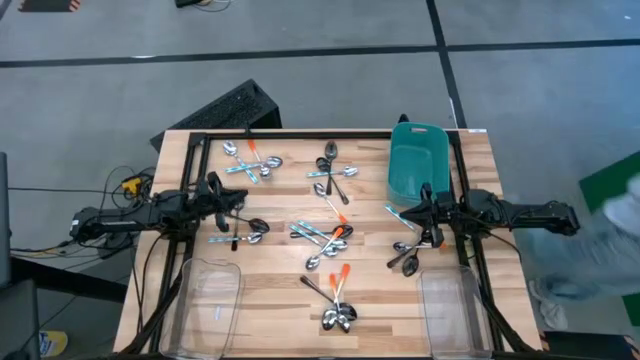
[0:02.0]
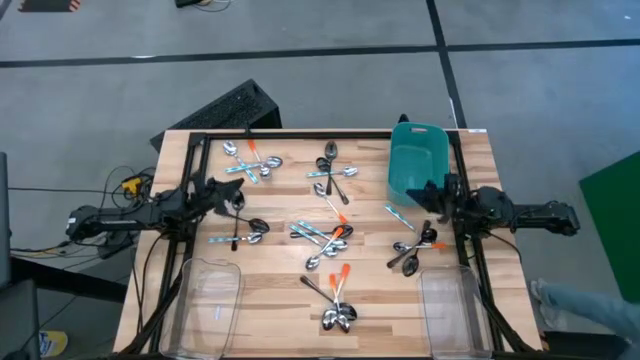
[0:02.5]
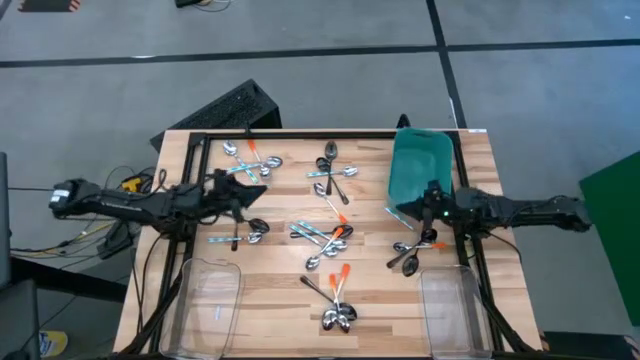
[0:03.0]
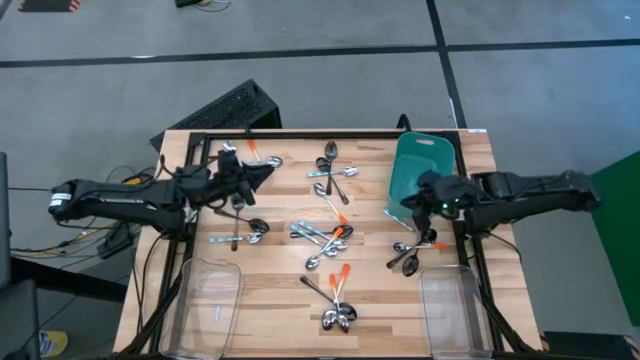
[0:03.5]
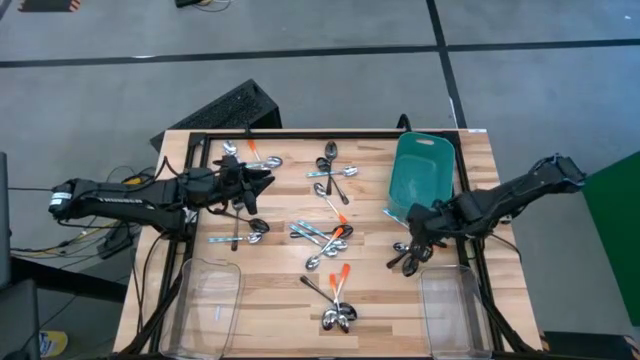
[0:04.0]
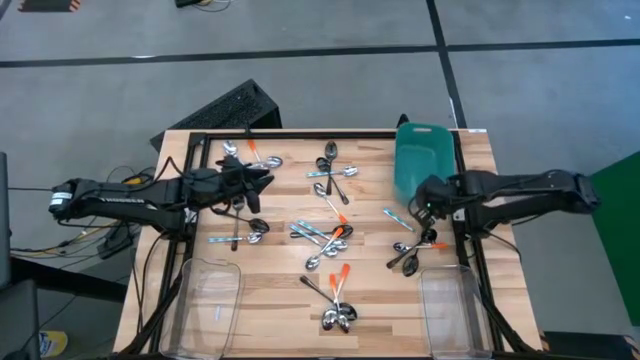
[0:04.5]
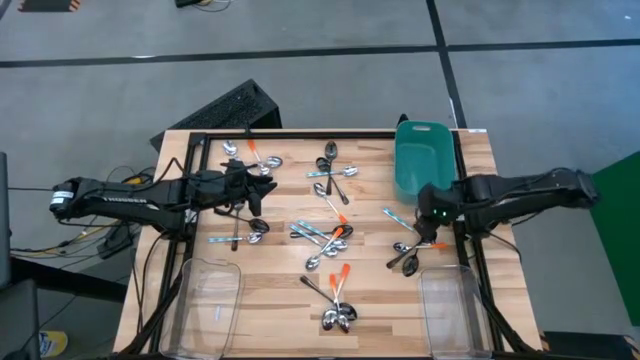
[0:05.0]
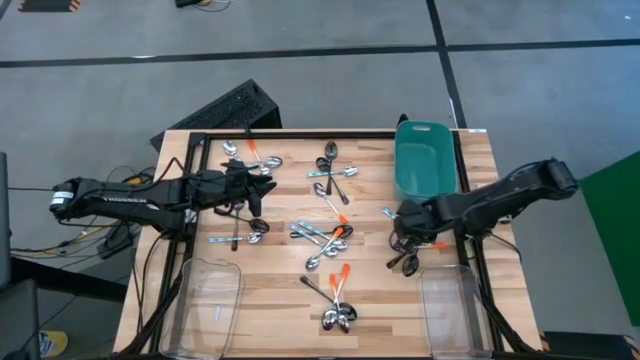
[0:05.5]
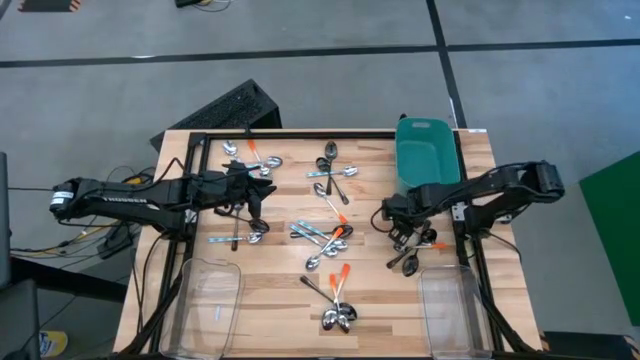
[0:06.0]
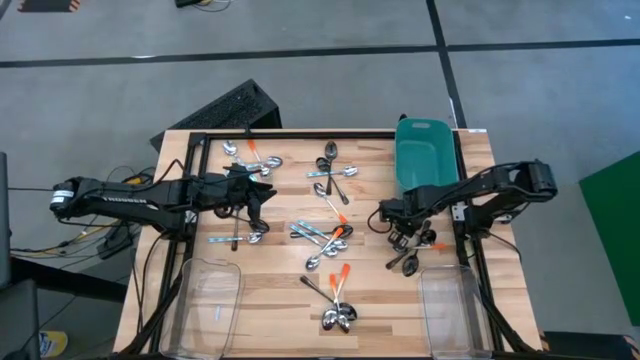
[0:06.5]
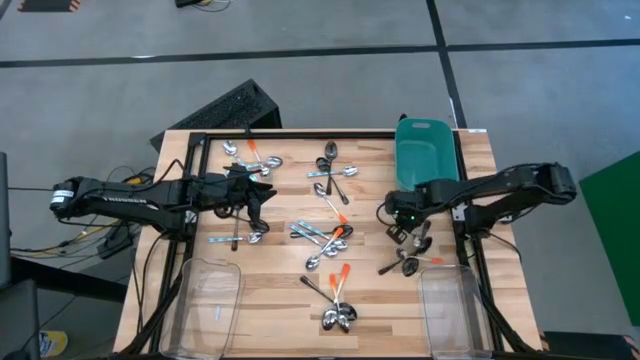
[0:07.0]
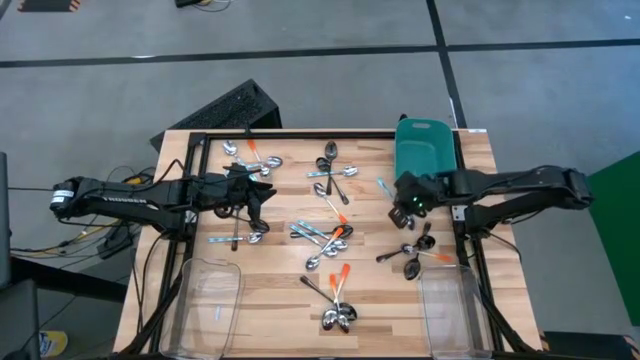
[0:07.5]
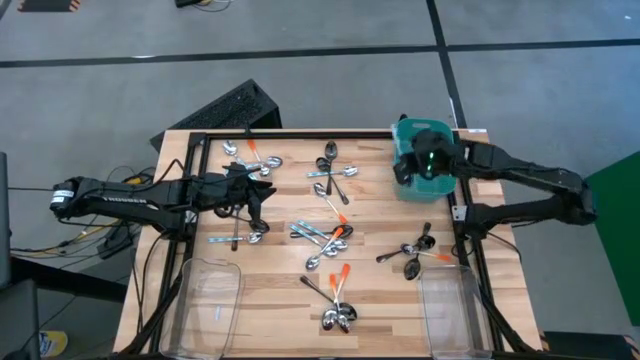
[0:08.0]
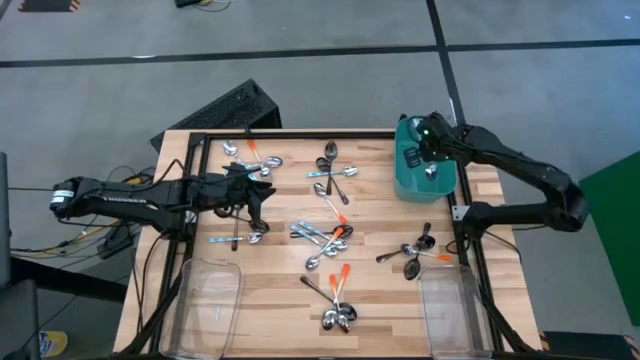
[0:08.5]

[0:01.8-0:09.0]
Task: Sort silverware by color (type)
Put the blue spoon into the blue bin

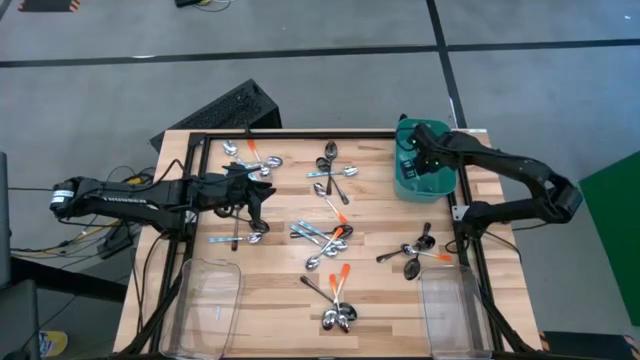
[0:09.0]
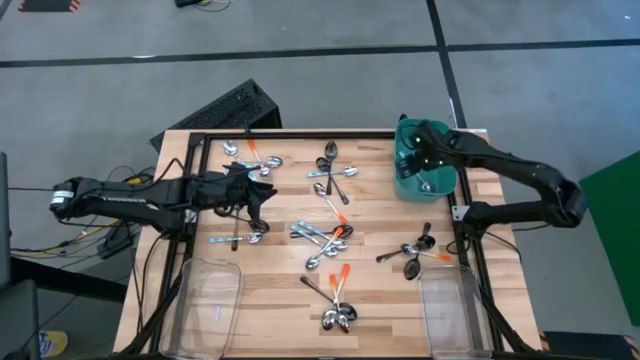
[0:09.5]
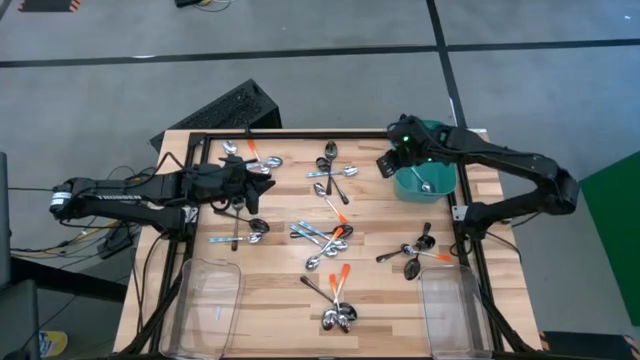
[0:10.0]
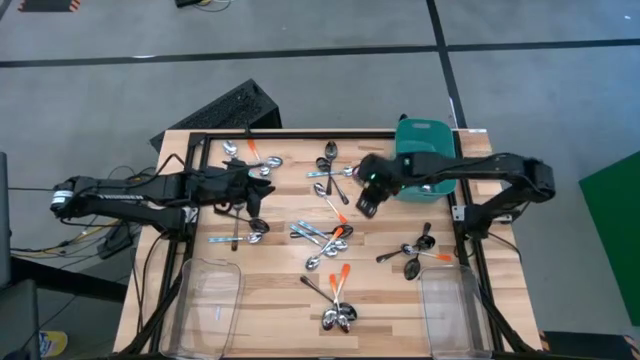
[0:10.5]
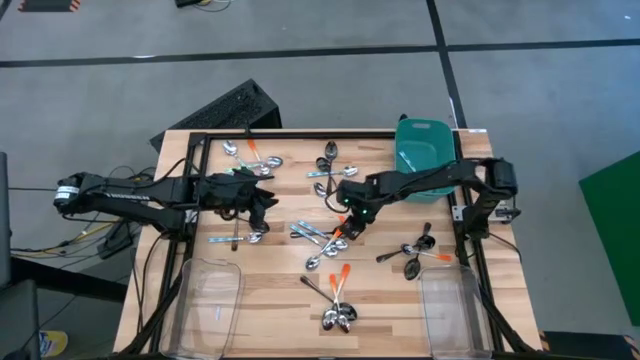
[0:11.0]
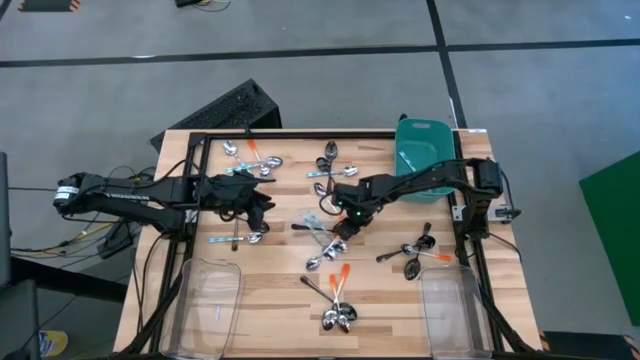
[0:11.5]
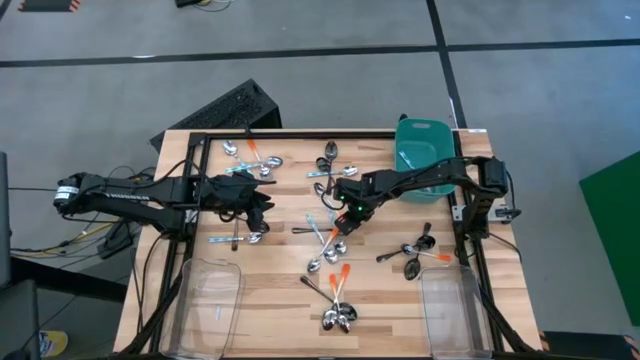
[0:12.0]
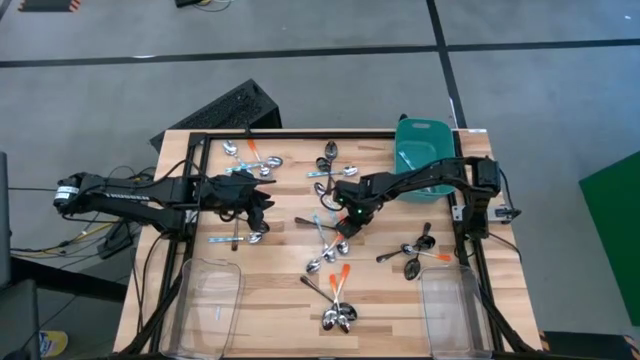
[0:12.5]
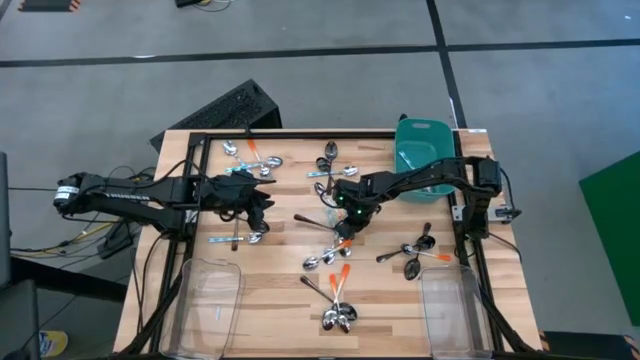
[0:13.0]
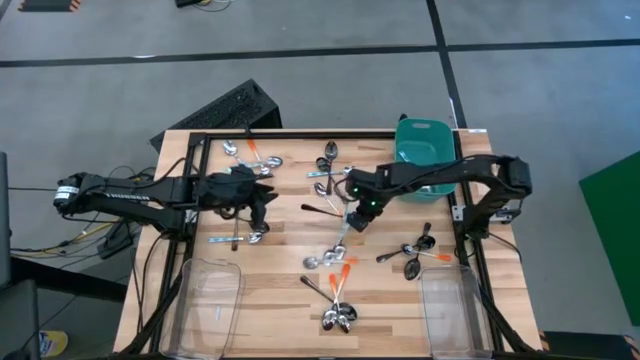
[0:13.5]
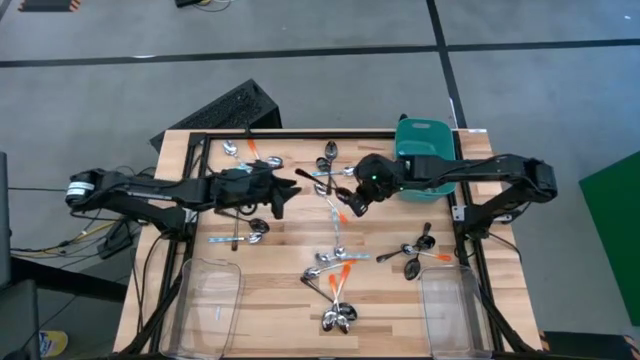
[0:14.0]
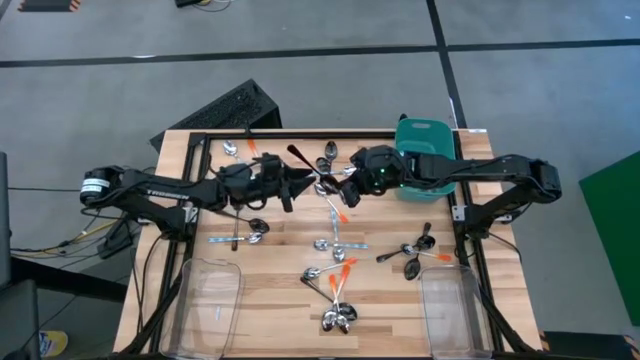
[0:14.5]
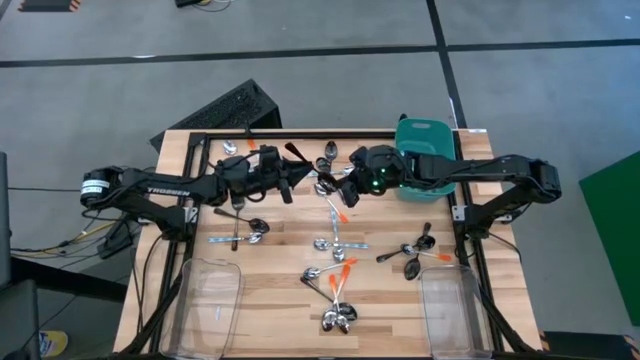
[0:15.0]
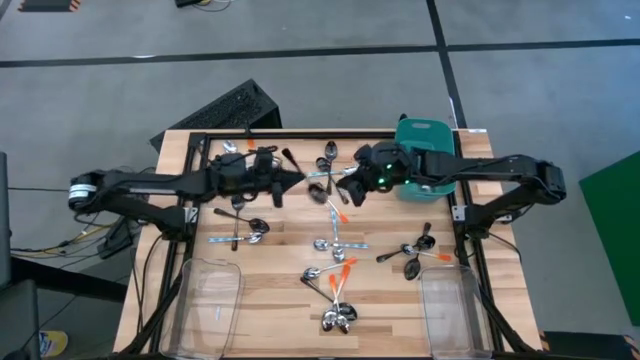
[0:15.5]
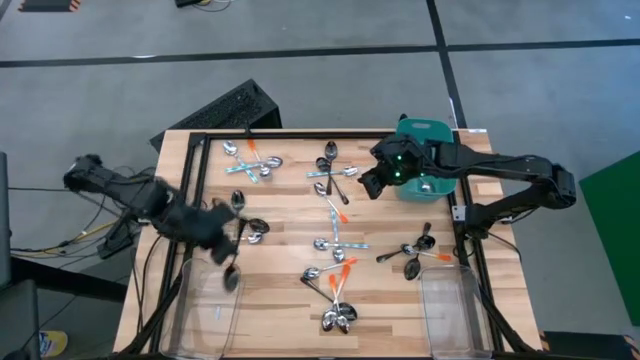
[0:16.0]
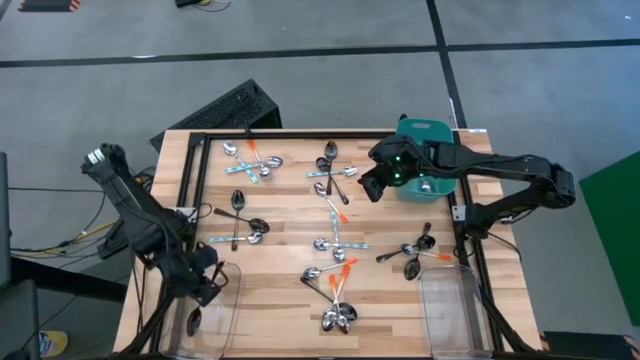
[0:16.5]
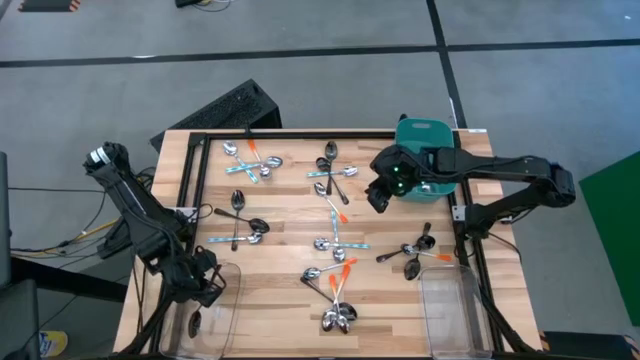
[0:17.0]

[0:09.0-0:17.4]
Put the black spoon into the left transparent bin

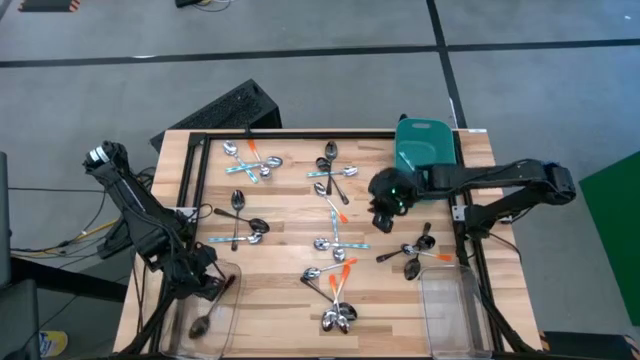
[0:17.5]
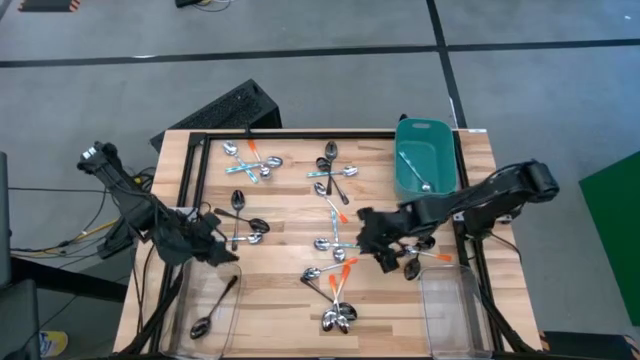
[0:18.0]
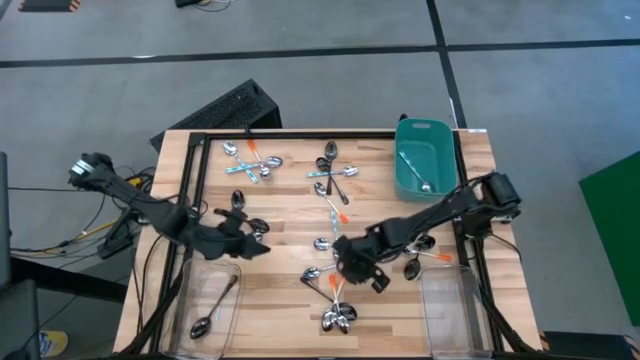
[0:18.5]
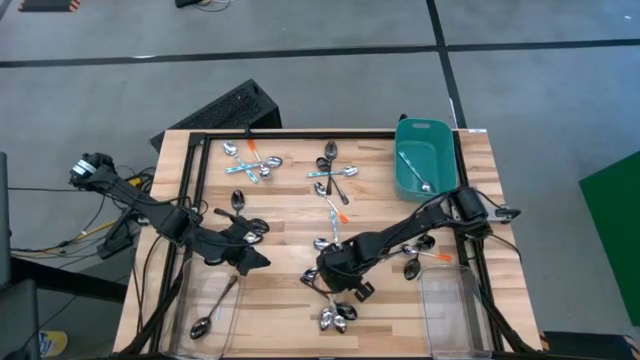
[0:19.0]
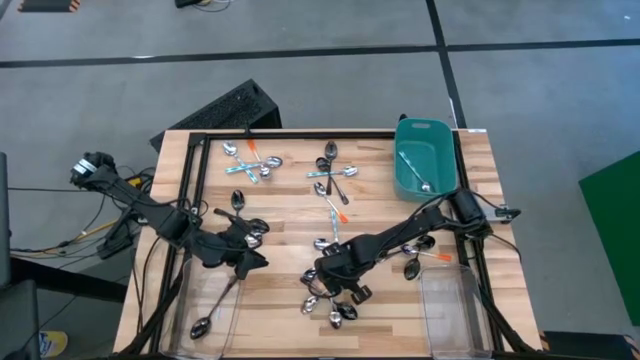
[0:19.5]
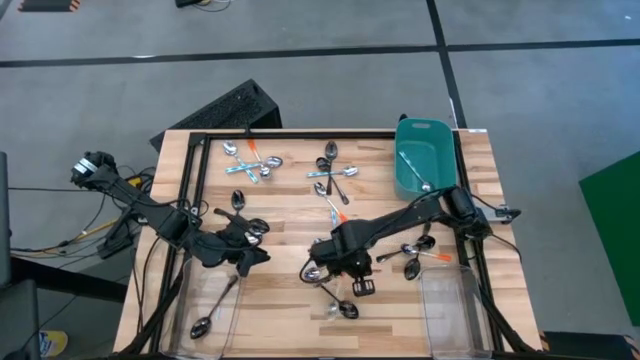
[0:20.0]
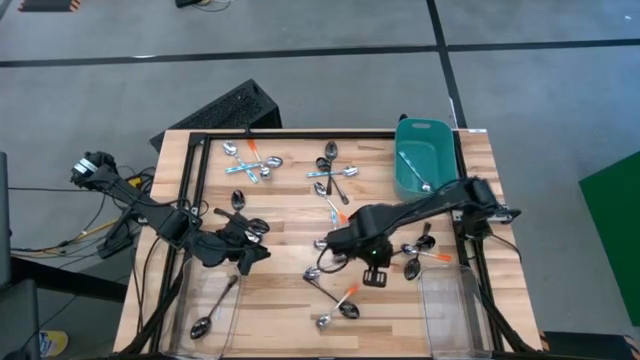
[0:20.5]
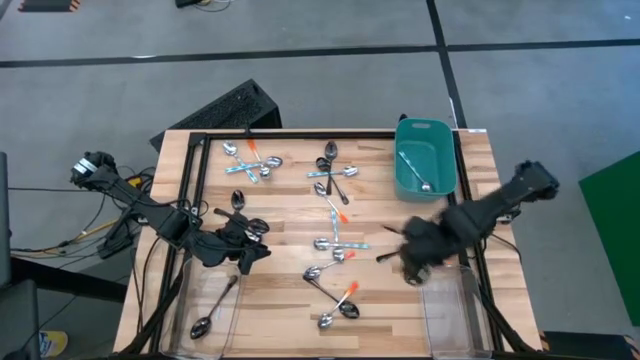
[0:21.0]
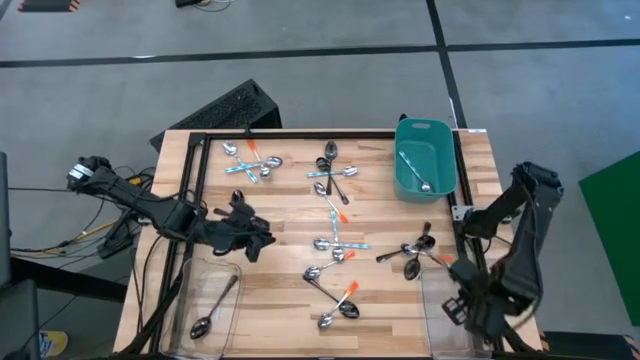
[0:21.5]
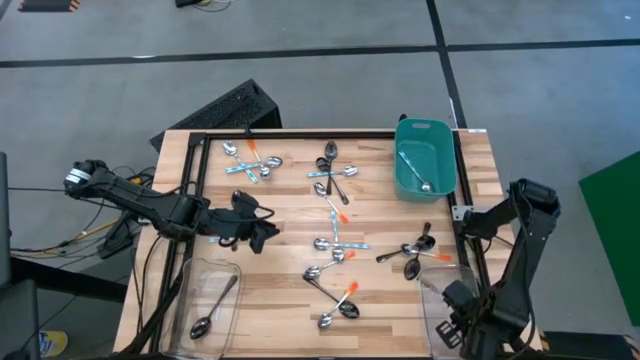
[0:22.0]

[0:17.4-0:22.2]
Put the orange spoon into the right transparent bin
